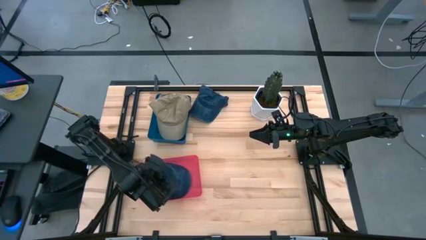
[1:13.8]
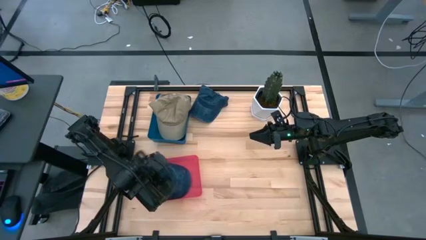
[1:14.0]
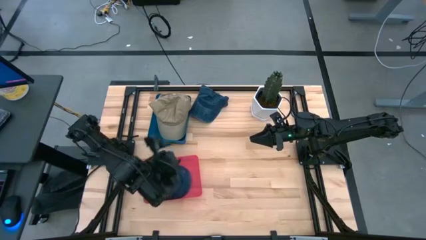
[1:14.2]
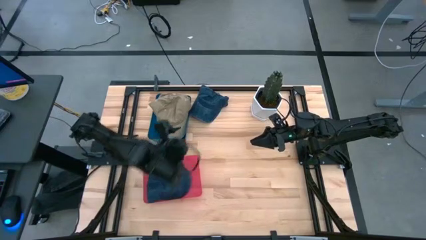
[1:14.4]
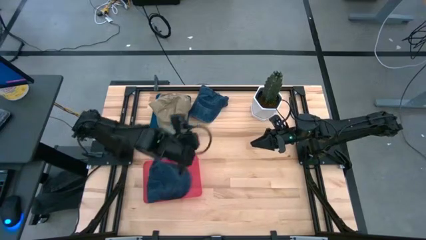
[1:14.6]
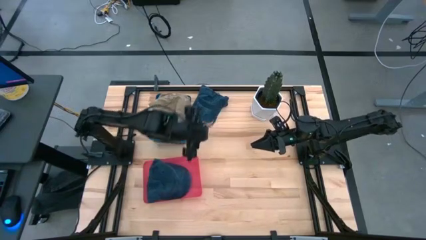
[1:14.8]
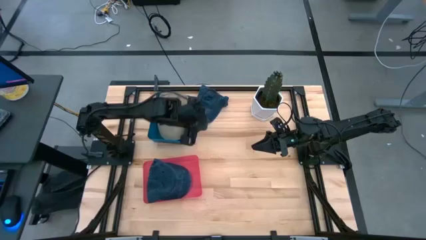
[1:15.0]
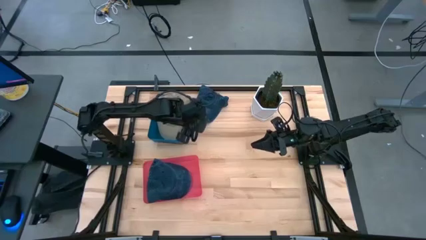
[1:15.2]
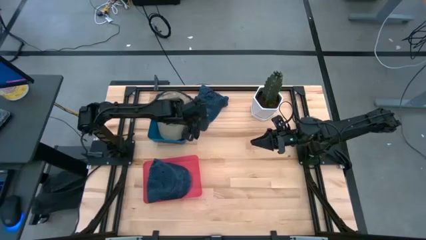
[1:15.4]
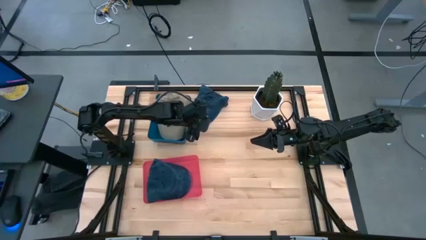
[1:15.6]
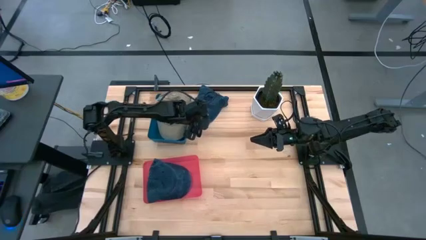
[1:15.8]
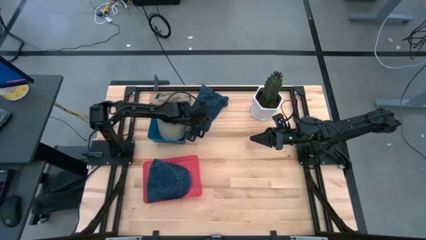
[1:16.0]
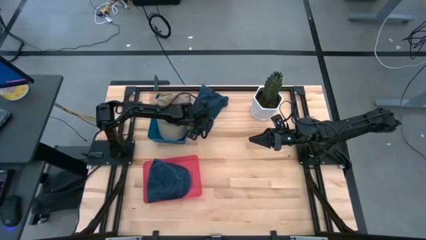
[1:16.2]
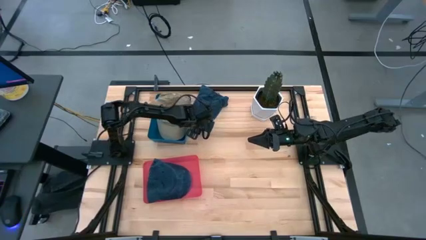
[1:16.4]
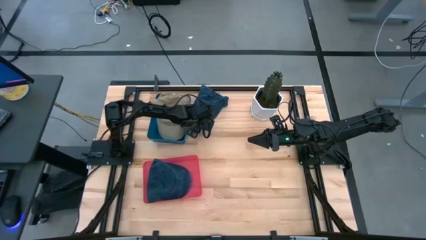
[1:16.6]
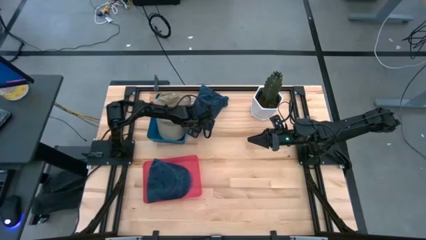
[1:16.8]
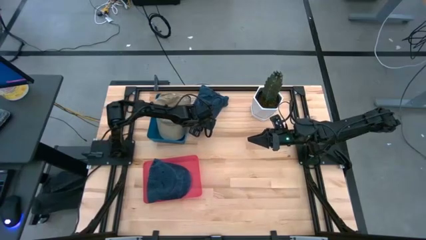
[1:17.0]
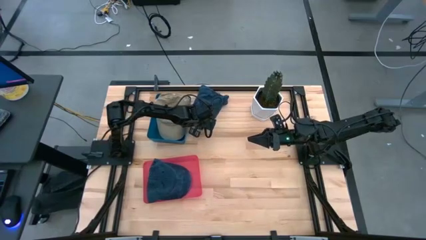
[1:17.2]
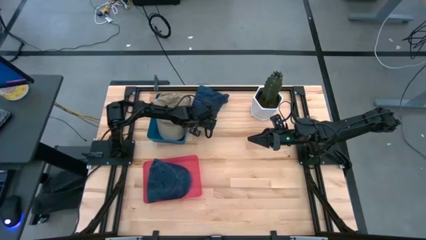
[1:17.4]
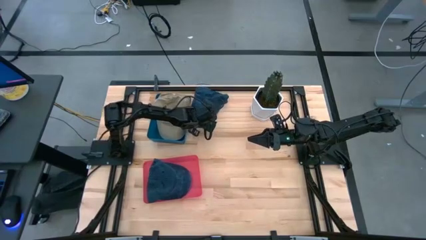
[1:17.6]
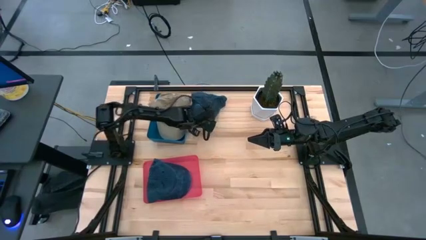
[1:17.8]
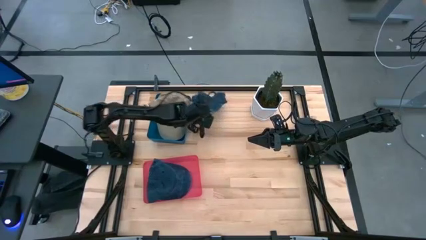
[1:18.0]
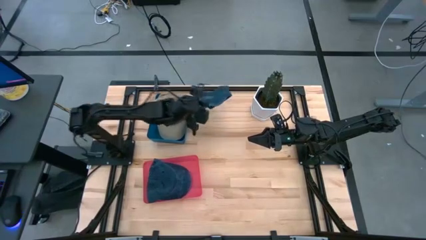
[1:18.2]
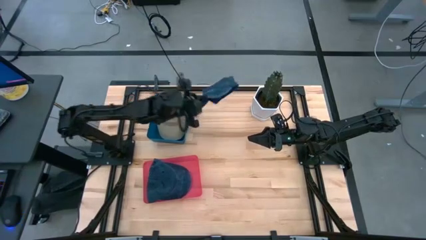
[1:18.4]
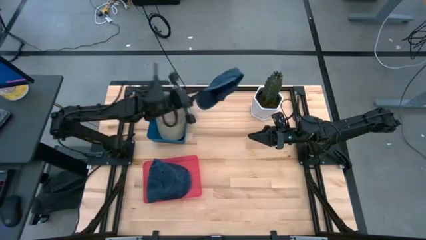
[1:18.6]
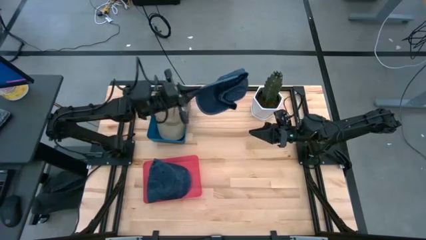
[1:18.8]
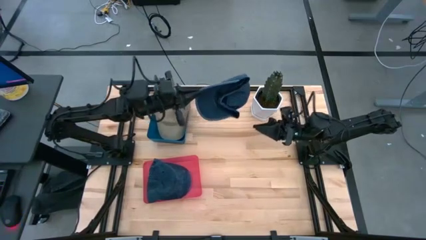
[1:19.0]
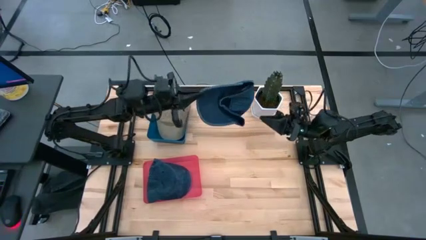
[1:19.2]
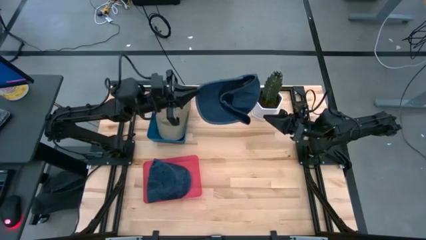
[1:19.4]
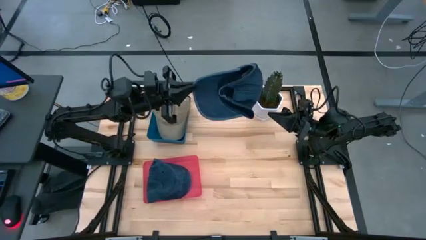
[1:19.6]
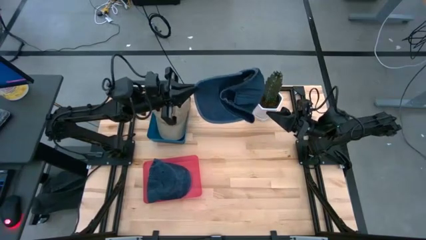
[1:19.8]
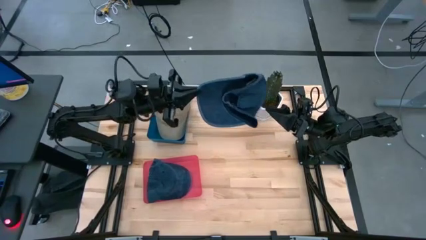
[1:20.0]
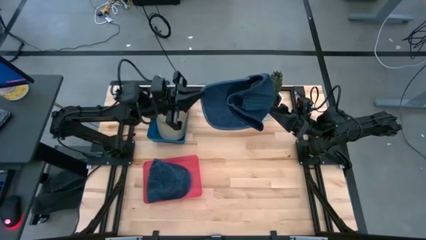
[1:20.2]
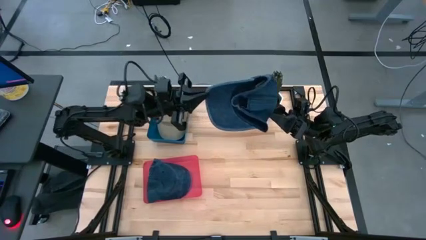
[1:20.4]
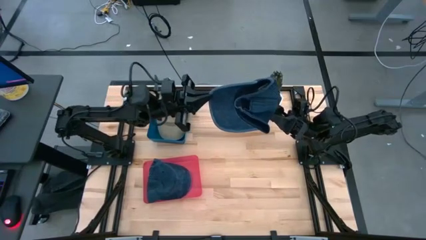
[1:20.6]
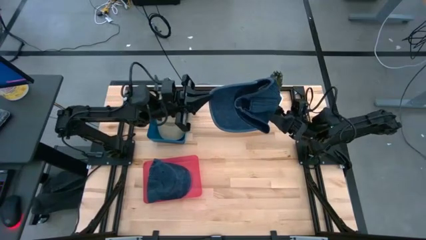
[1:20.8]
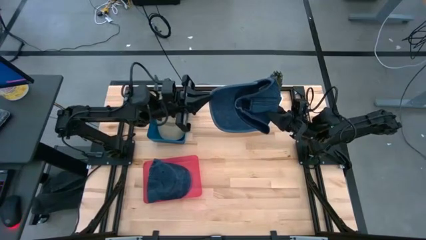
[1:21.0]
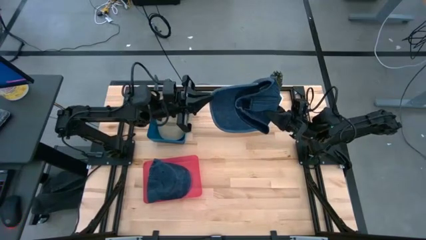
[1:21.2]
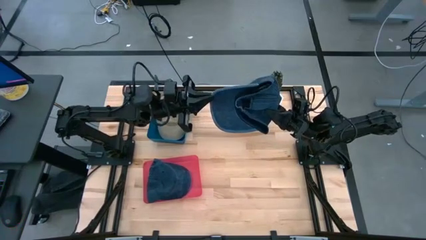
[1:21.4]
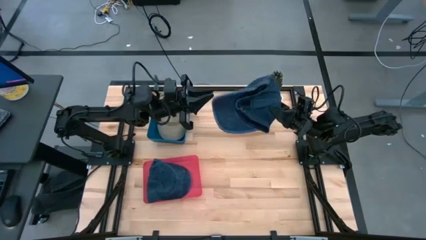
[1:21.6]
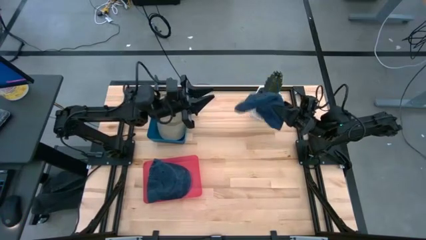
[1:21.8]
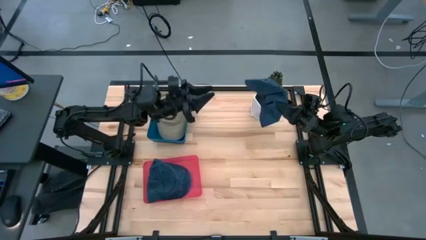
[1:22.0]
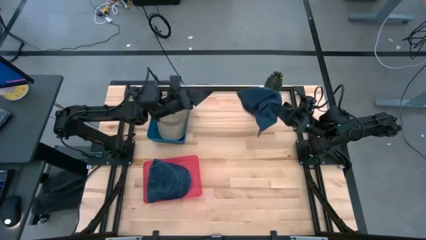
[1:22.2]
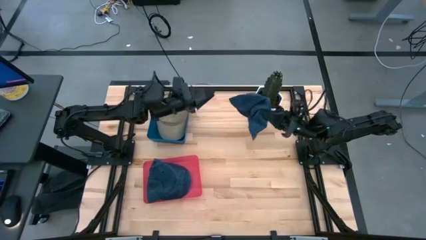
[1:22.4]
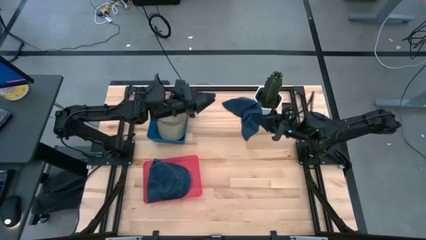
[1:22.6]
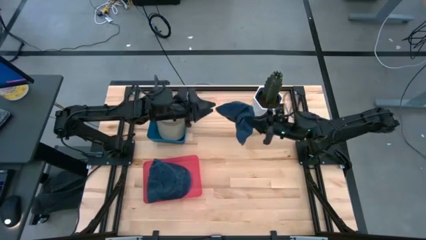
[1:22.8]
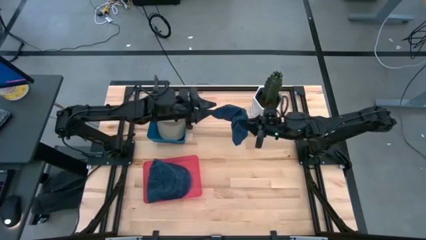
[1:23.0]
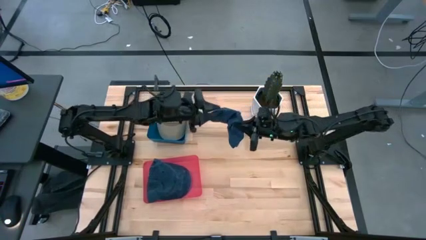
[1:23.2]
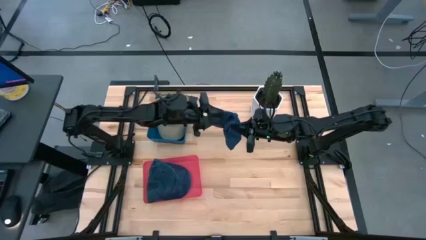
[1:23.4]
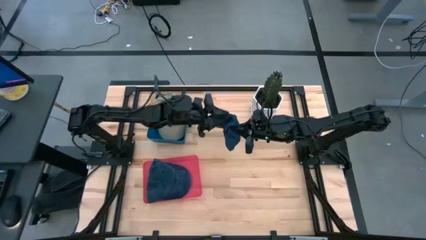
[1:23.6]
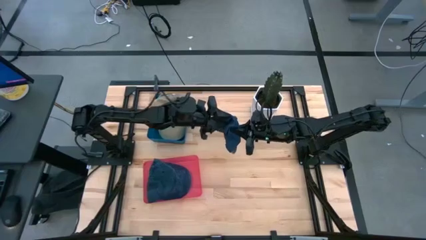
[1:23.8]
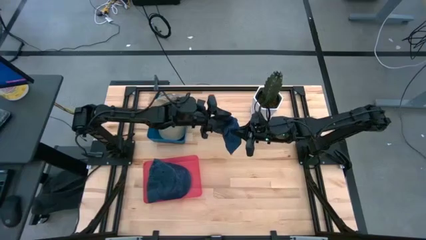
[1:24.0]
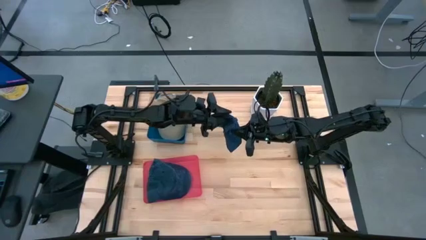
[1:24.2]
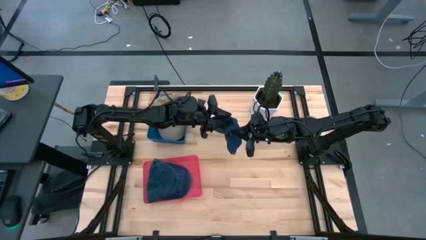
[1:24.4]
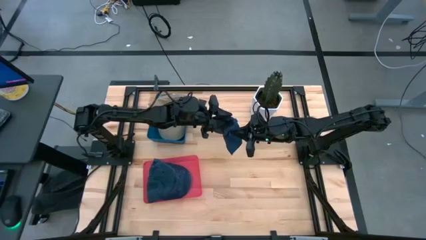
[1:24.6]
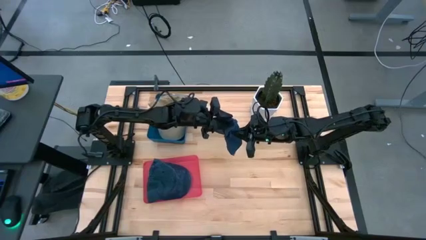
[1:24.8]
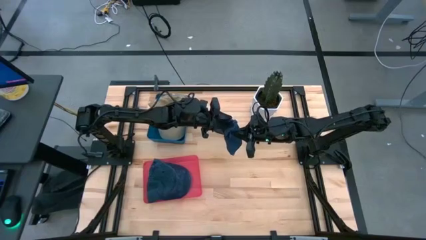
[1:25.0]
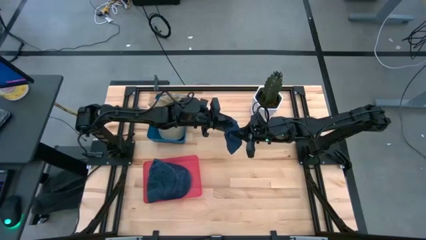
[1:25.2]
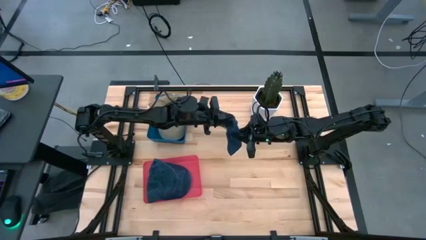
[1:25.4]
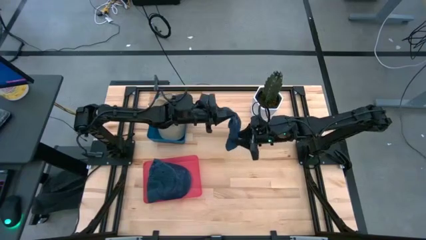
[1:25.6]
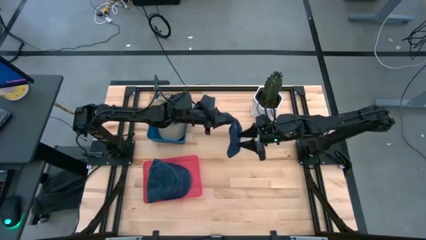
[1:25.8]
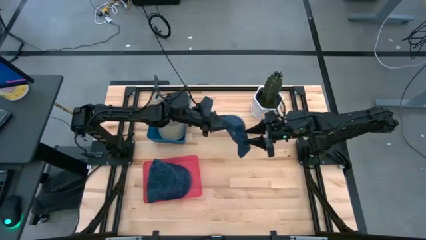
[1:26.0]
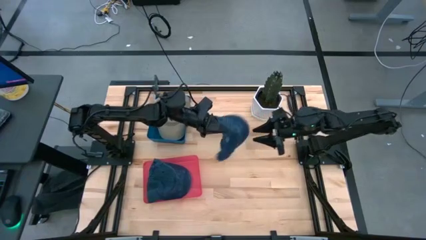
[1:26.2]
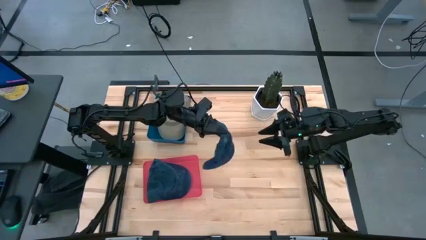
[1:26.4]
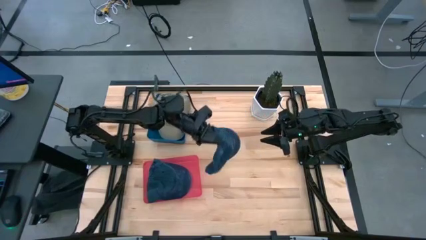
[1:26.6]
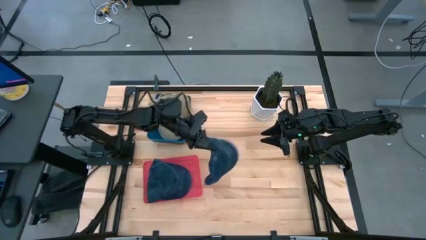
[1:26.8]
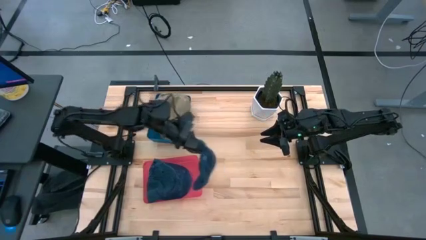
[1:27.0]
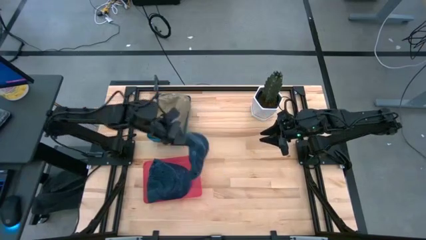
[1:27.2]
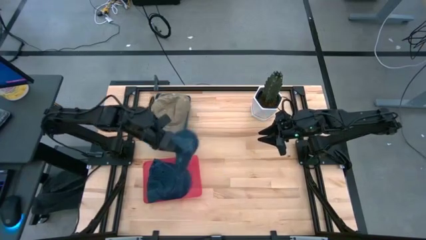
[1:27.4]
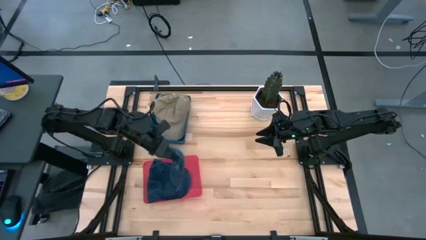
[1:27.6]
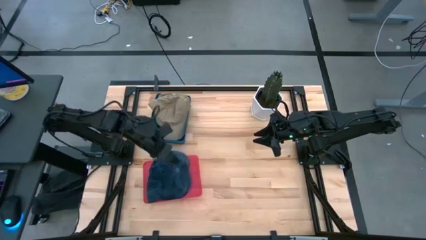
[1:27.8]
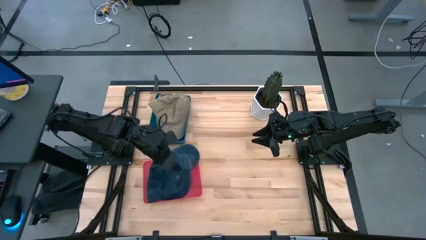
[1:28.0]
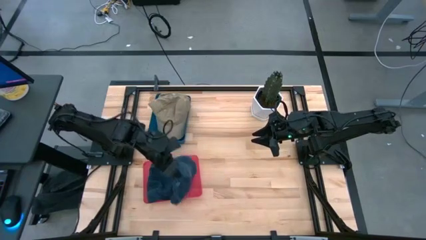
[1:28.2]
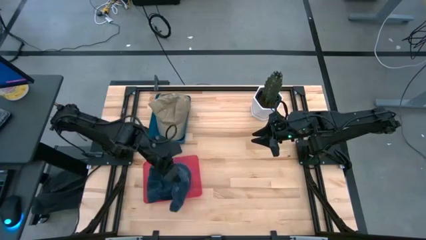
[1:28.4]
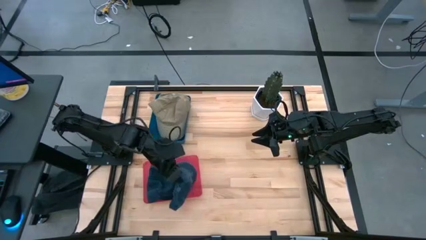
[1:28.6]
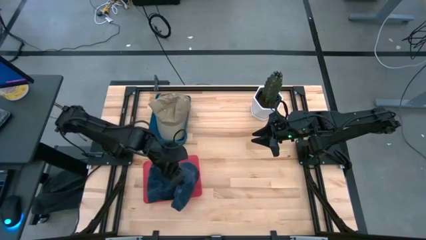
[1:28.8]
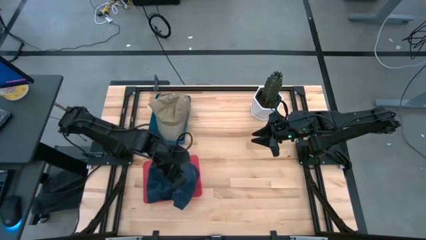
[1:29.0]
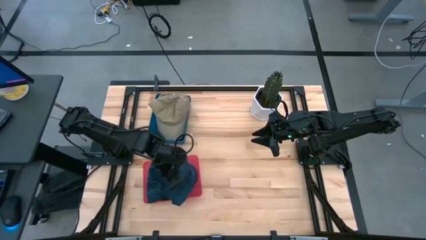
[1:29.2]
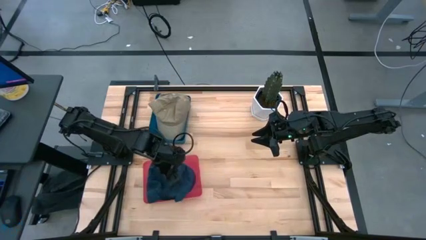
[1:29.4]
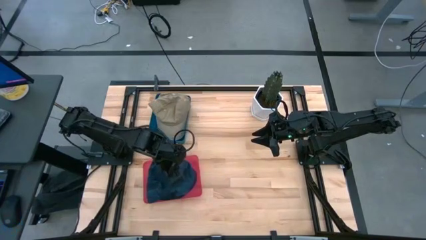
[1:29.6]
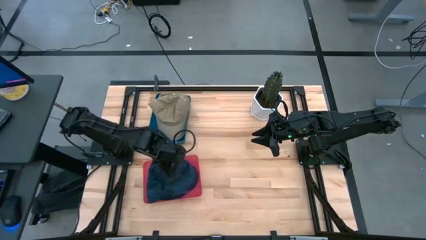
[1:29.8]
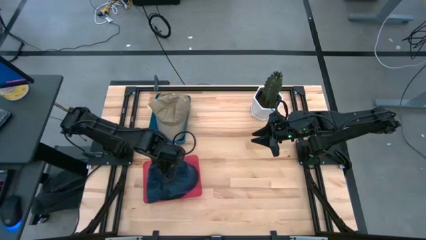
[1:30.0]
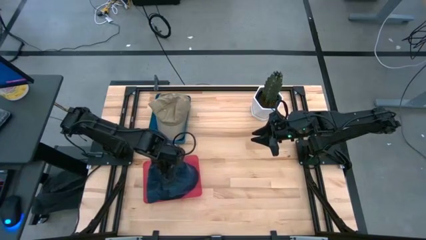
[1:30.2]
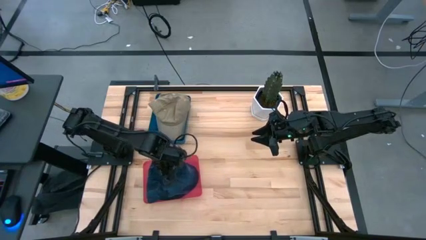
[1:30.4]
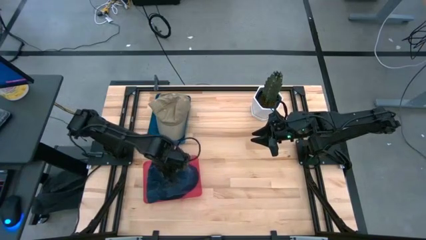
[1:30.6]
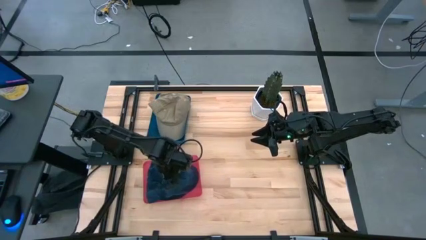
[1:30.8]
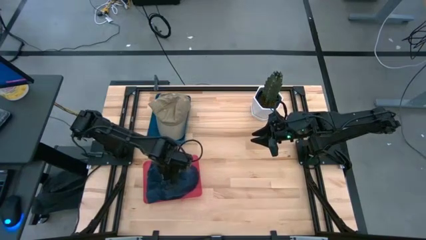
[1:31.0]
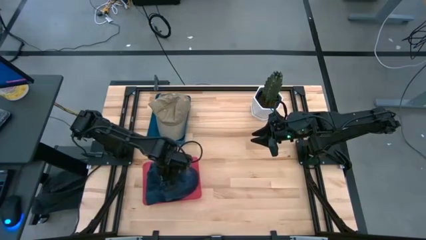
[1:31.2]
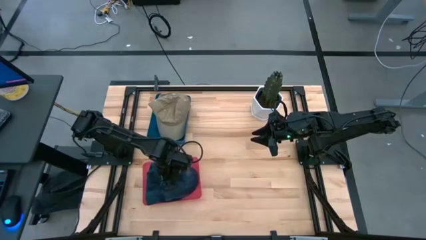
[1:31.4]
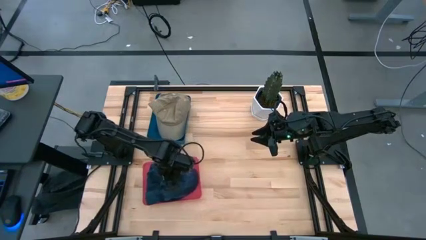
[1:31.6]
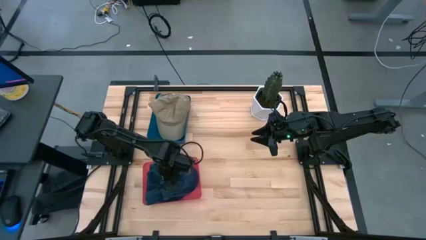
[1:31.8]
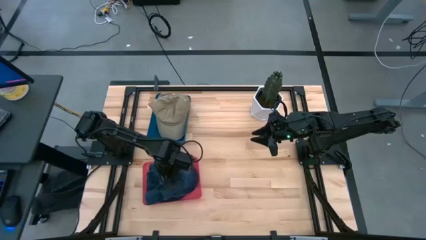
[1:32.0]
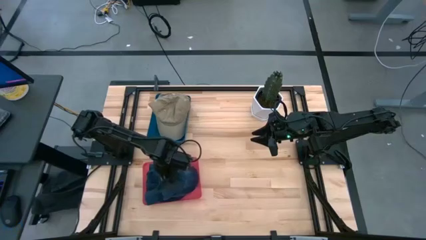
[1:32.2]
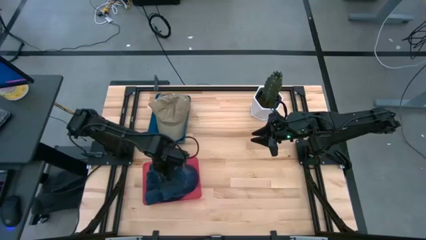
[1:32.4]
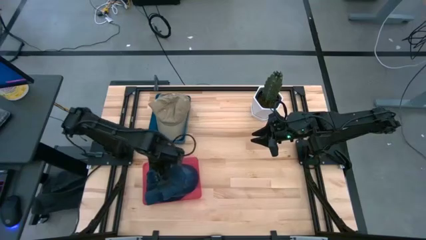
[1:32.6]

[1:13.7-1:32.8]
Task: Pick & Place hat
Put the blue cap into the pink bin
